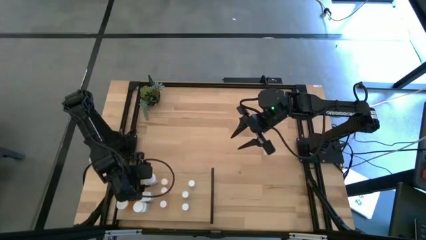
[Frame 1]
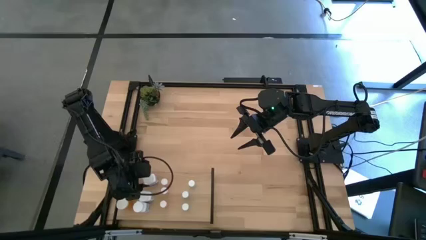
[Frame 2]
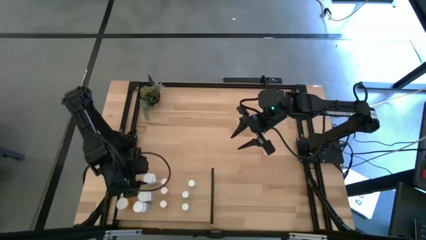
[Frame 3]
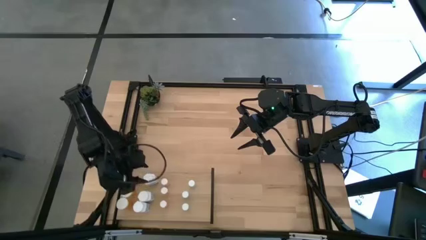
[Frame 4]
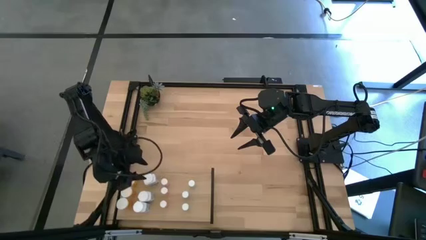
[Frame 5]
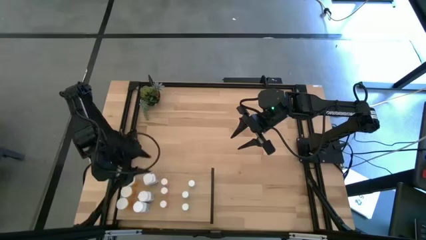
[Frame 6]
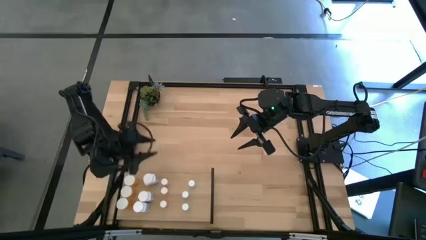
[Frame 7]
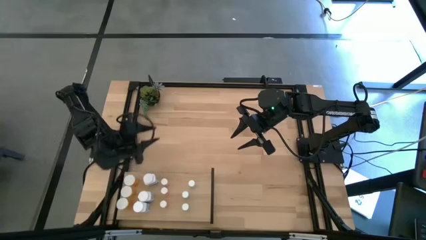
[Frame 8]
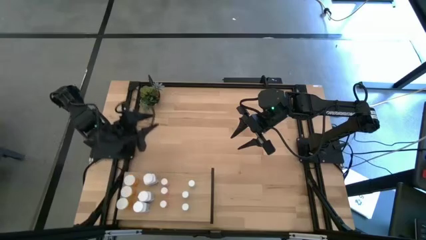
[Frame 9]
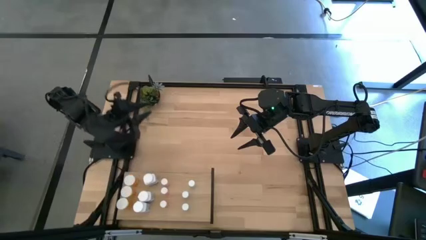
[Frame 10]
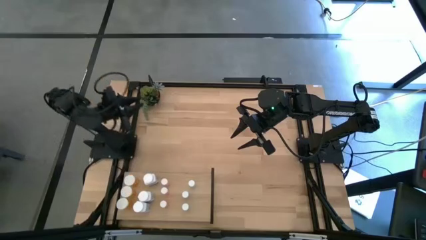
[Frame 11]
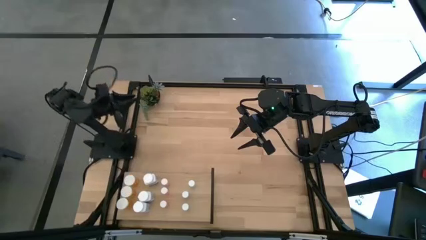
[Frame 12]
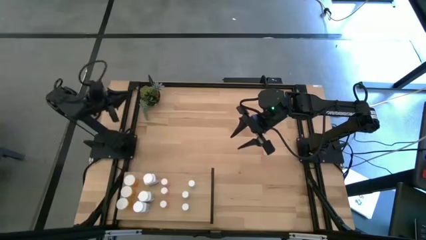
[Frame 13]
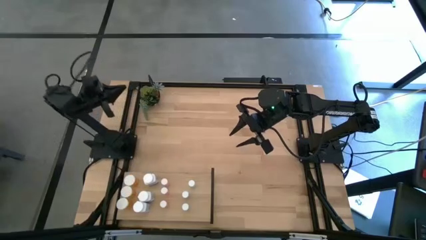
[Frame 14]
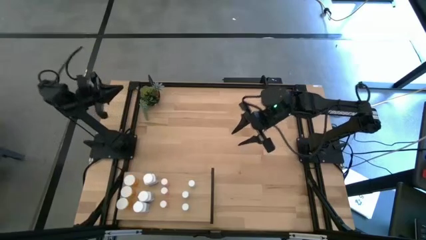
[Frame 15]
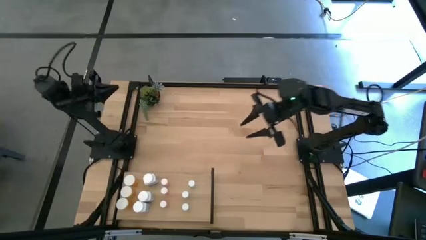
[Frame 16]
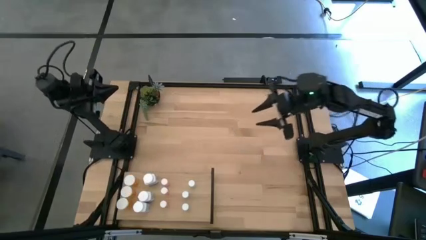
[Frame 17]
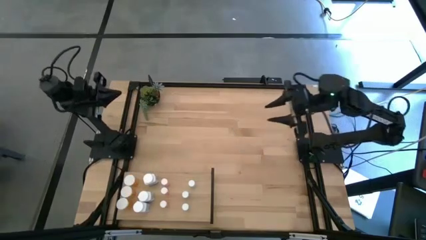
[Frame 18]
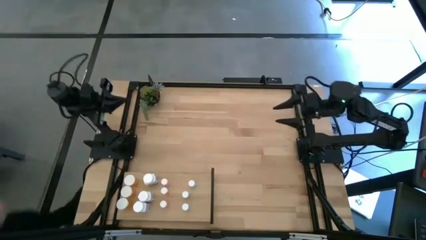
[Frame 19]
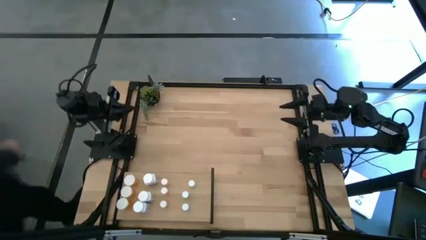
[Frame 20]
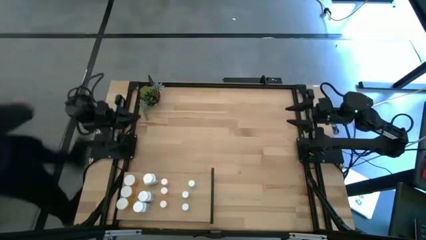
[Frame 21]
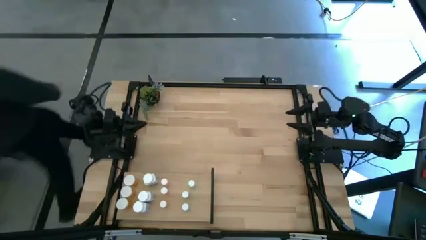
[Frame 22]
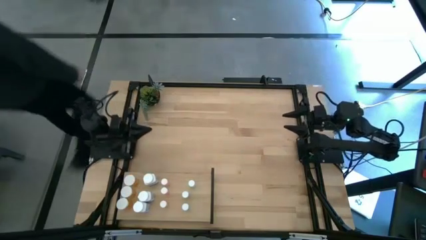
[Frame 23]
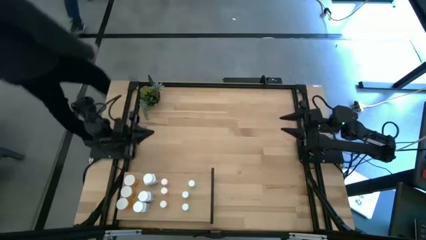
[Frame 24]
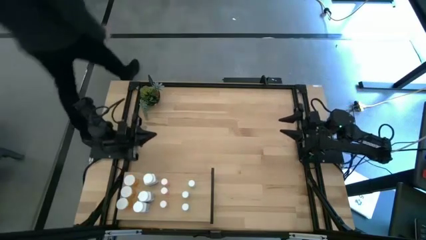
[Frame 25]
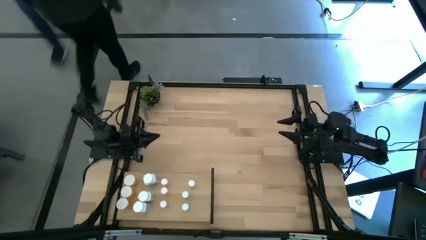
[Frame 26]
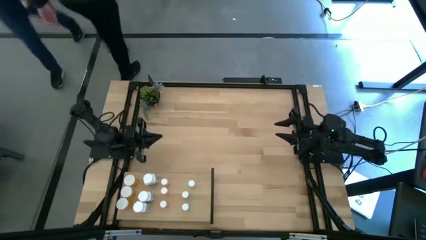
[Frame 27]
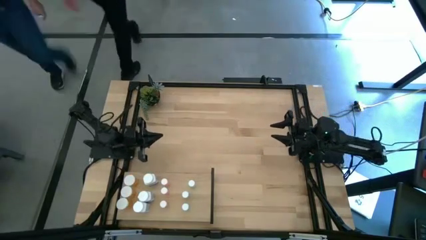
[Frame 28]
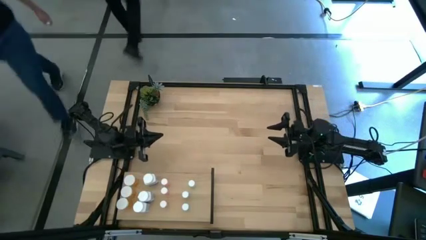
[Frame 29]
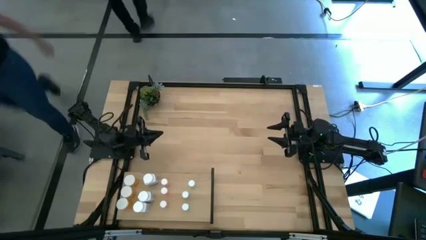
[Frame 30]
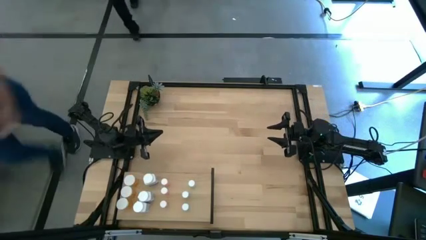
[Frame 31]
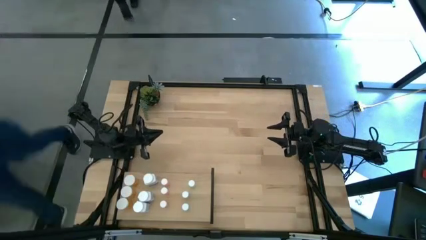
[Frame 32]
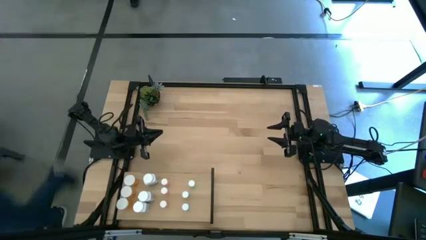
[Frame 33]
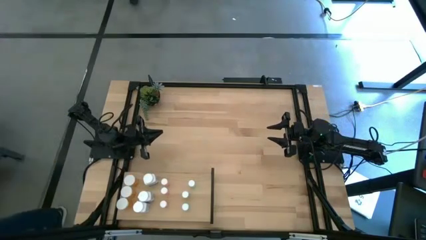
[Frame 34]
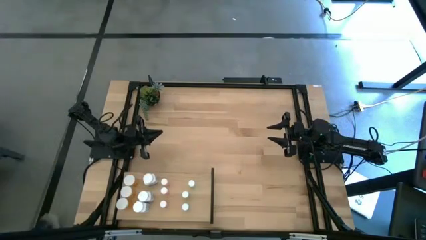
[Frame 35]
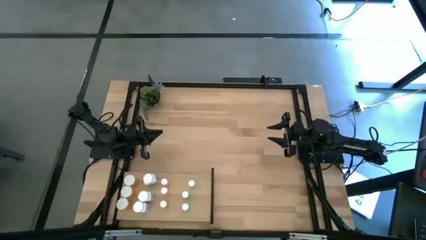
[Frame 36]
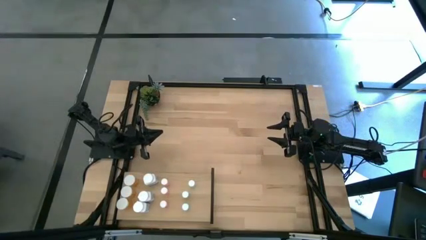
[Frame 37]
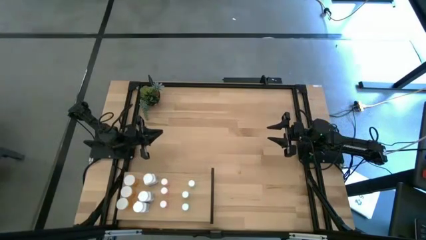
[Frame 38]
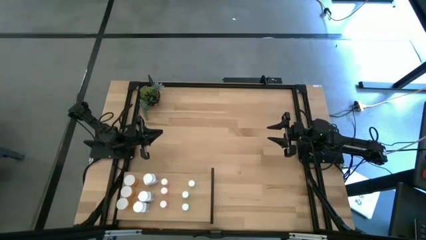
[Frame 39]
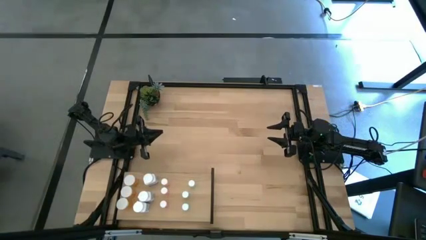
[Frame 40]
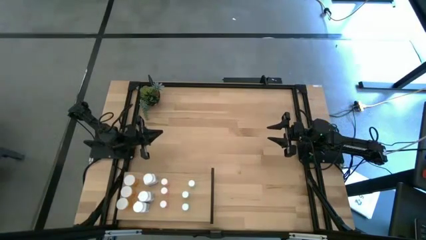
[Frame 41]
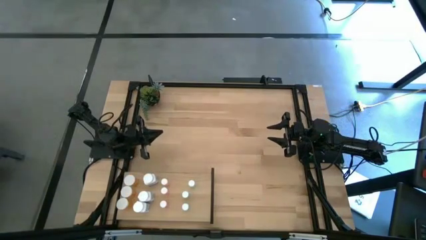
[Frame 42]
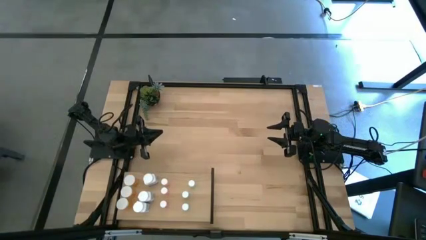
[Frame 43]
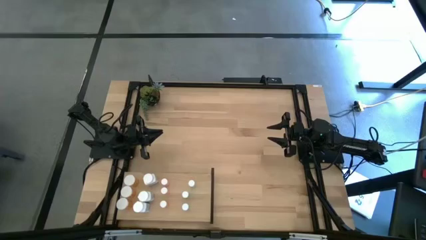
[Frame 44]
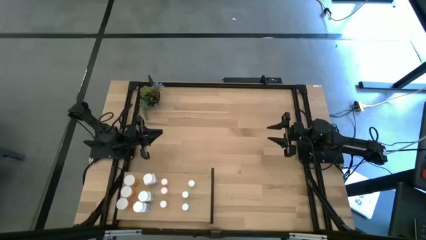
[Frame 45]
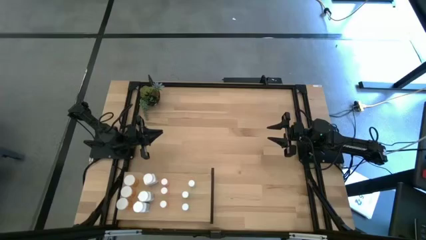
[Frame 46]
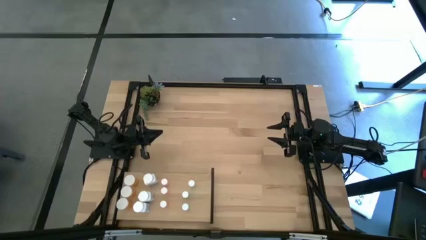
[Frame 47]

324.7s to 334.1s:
Task: Pick and place medicine bottles onto shelf by color
Return to Home Position

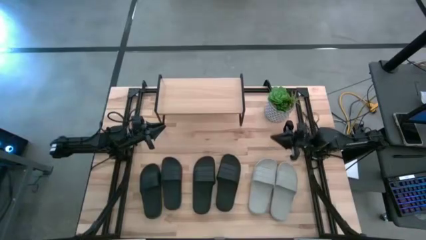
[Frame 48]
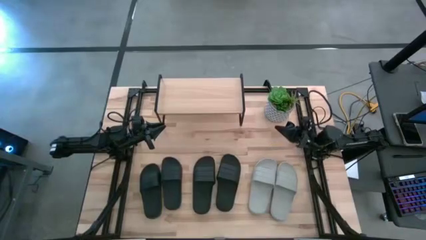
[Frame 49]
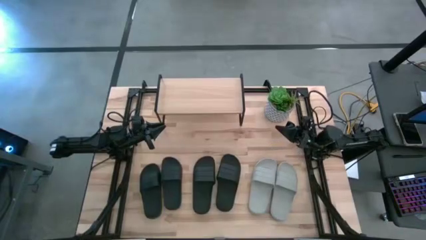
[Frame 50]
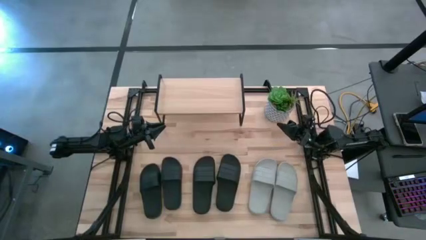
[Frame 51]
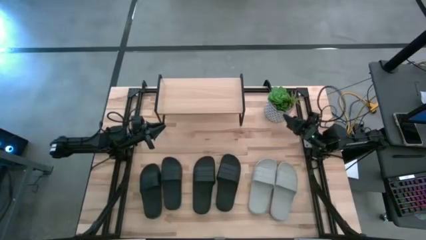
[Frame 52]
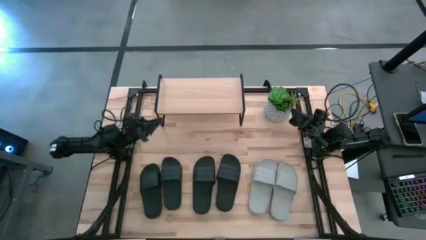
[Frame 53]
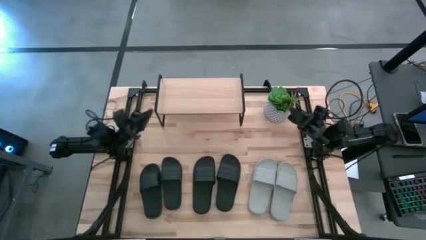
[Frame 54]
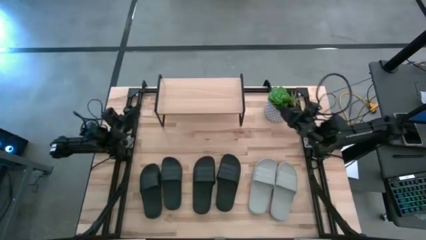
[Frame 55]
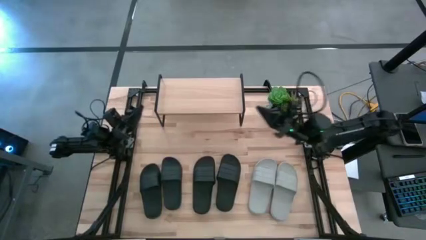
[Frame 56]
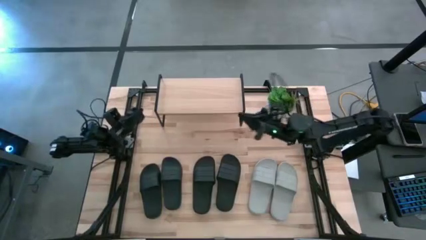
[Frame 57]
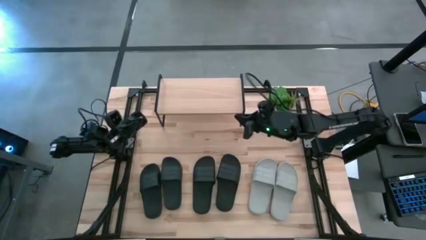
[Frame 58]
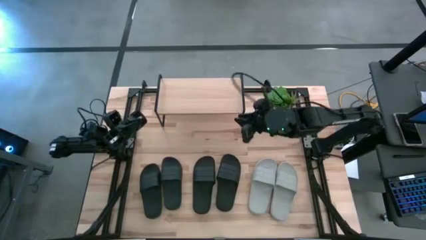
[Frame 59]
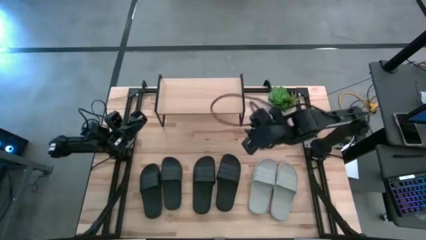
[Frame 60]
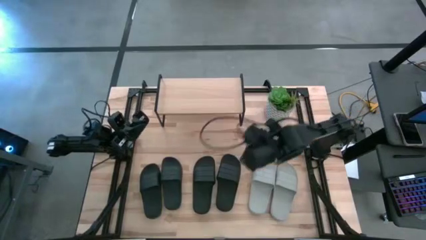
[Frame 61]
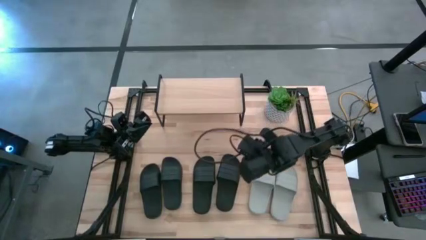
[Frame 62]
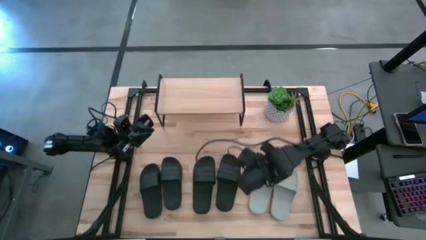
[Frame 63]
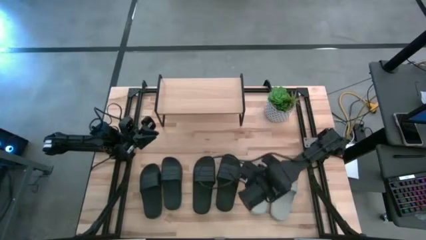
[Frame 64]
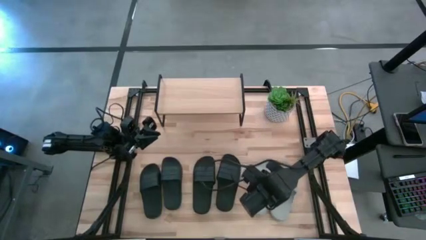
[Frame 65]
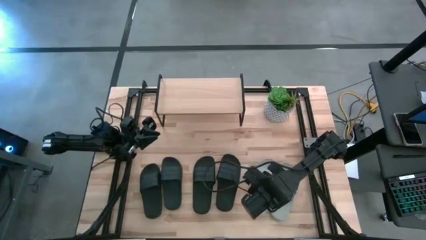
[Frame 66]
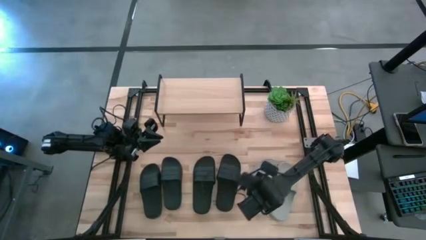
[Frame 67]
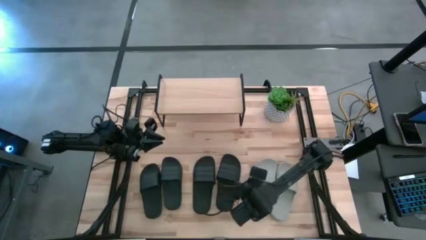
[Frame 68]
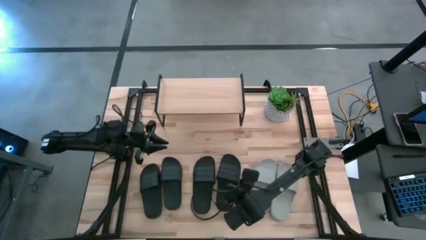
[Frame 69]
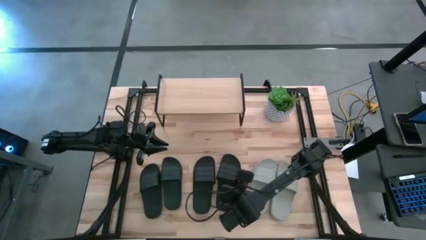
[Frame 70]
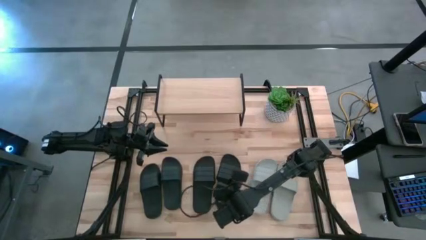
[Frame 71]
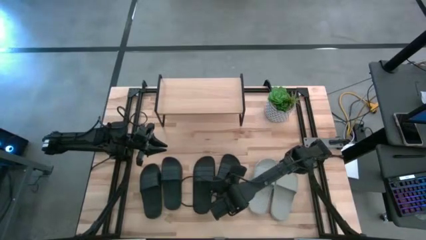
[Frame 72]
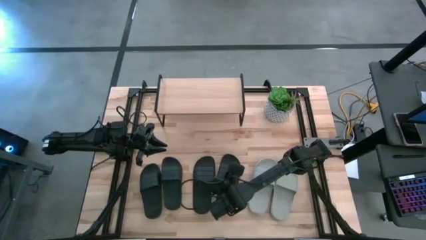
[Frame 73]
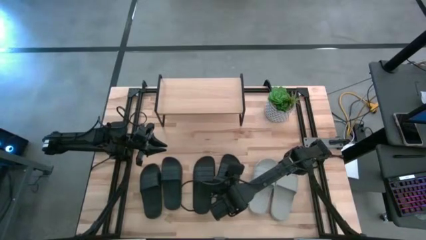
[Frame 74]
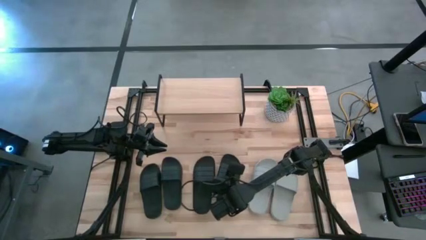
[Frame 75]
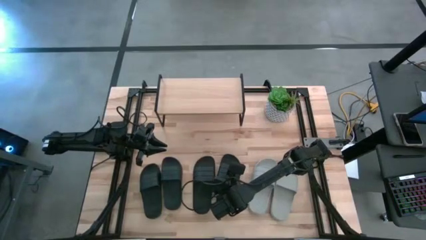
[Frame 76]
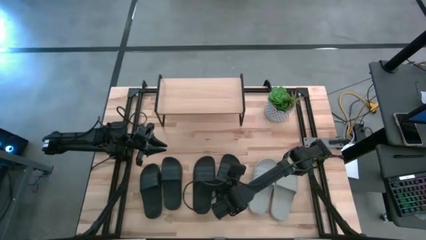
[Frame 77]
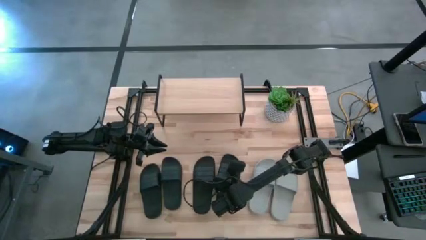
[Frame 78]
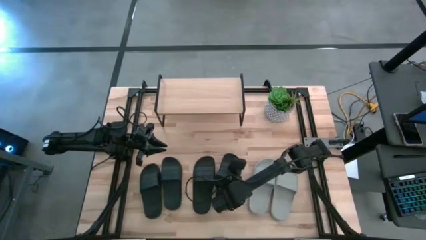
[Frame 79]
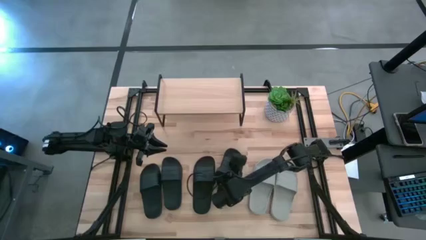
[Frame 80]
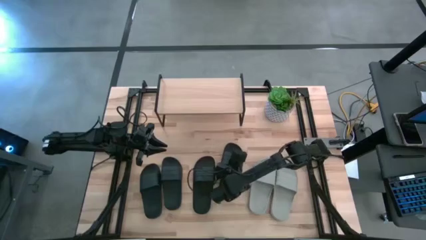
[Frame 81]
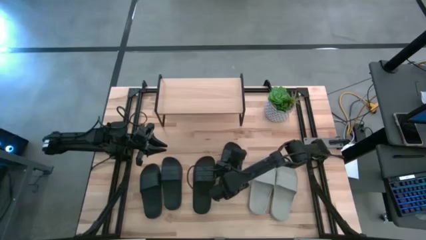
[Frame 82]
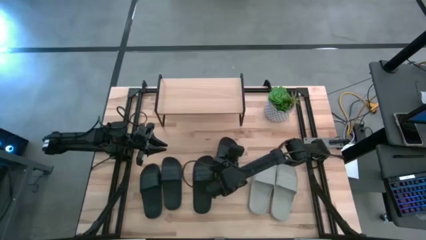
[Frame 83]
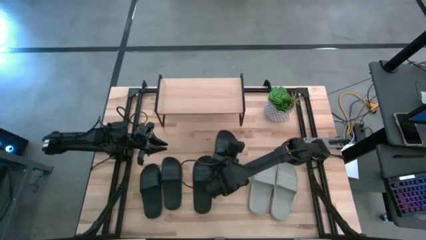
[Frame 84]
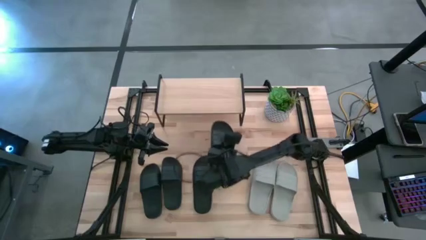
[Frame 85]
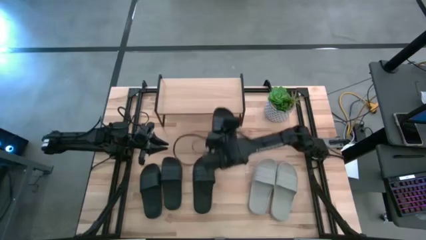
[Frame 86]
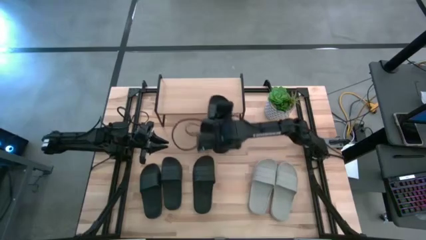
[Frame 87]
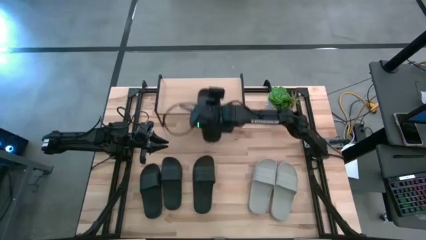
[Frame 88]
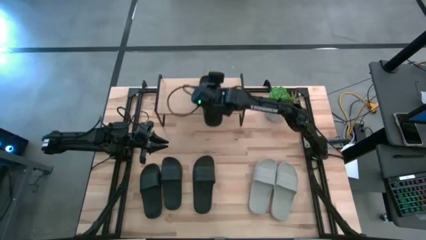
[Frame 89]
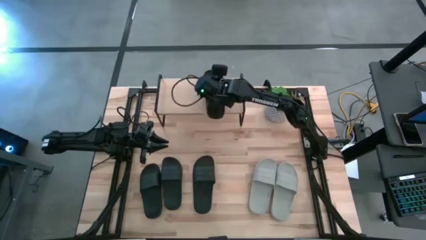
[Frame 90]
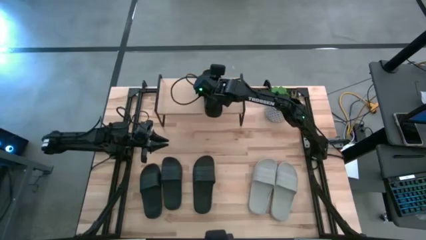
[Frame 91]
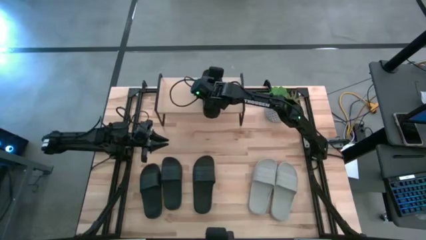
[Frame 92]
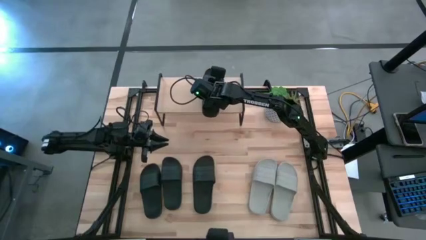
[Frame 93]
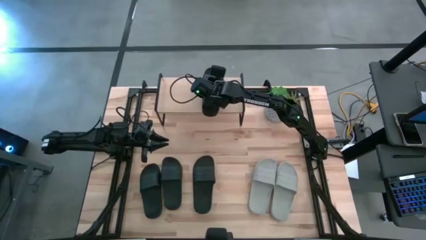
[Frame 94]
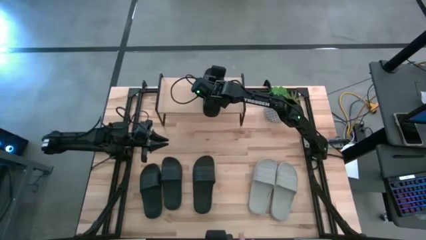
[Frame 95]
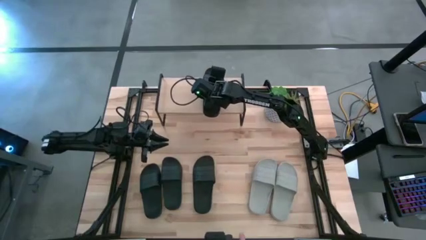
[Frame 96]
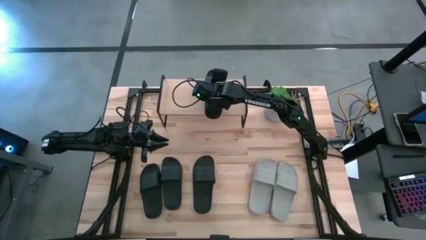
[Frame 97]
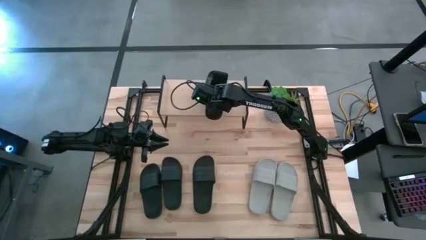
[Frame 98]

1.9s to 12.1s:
Task: Pick and place slides into the shelf
Put the black slide on the shelf
